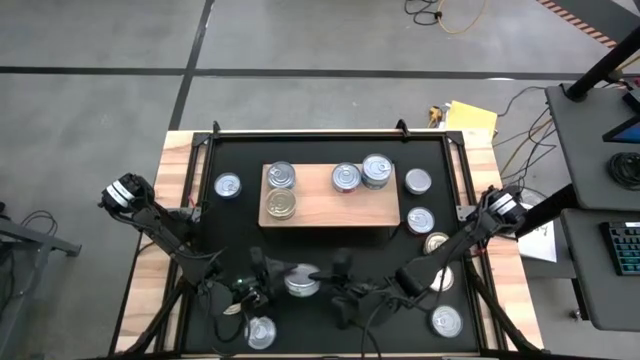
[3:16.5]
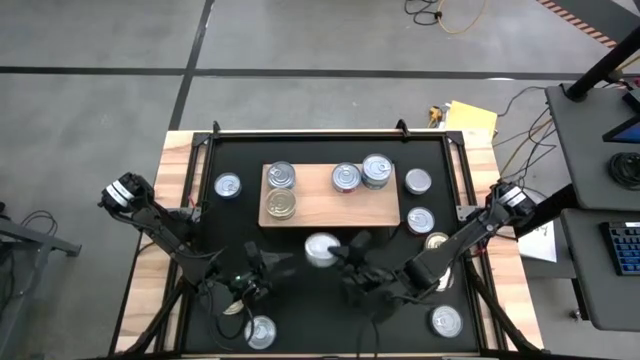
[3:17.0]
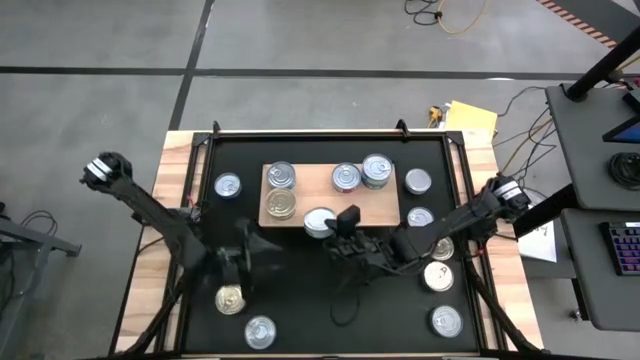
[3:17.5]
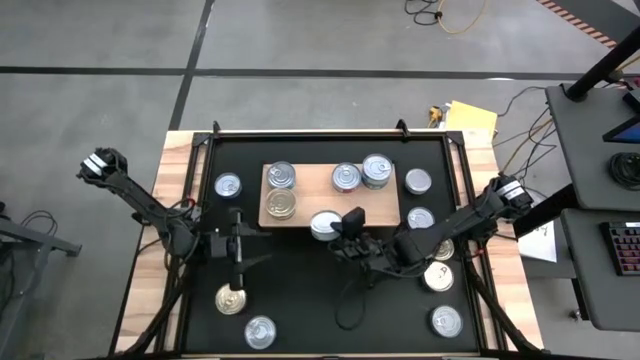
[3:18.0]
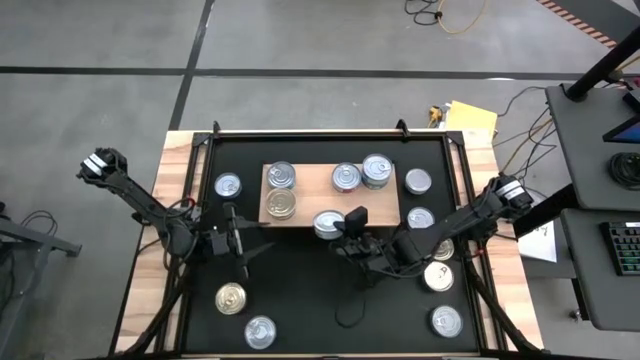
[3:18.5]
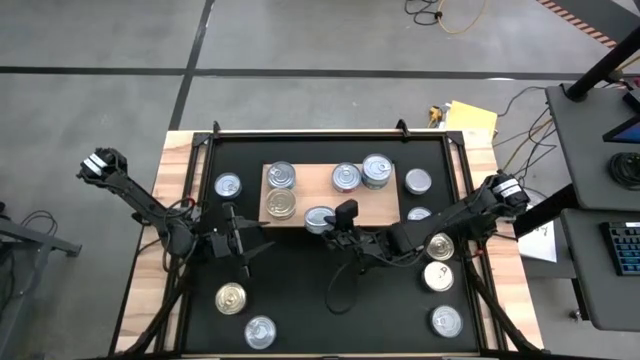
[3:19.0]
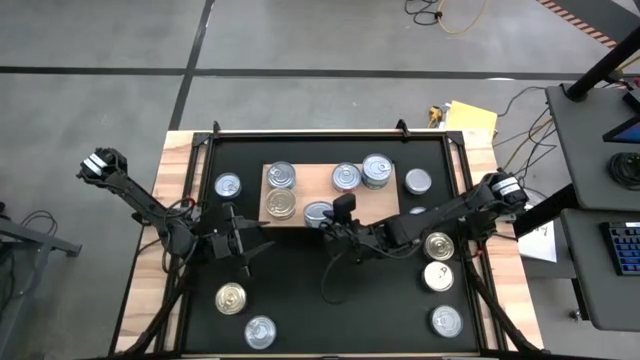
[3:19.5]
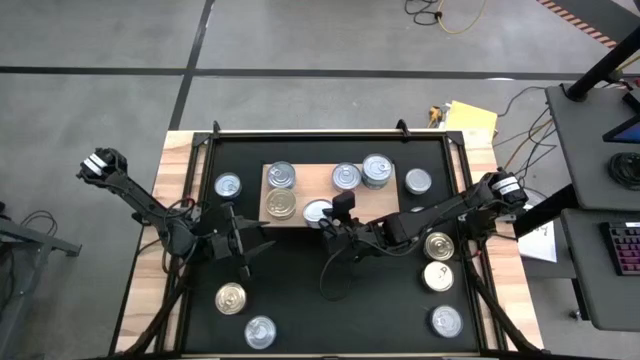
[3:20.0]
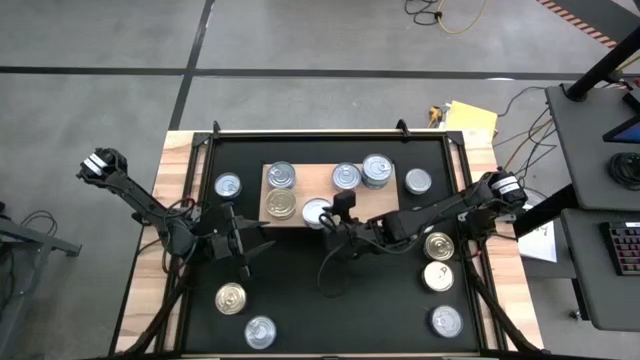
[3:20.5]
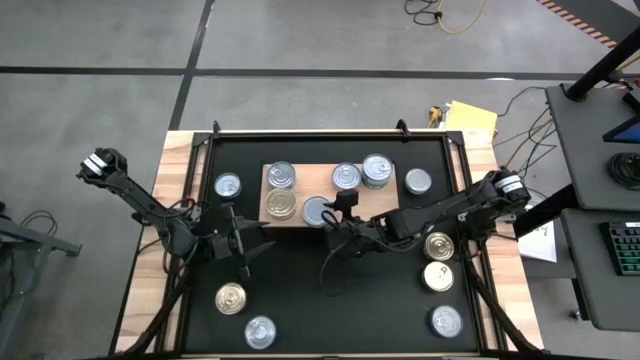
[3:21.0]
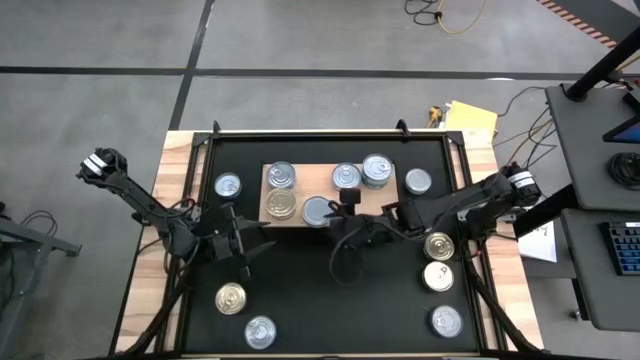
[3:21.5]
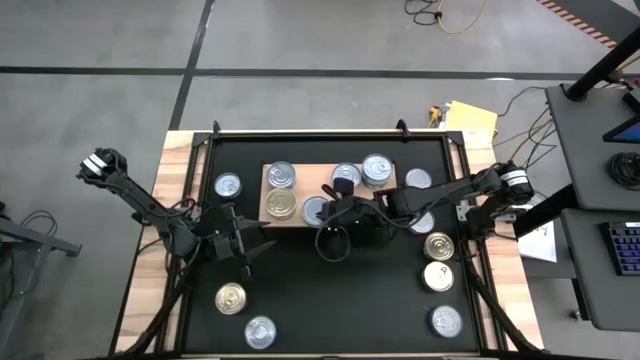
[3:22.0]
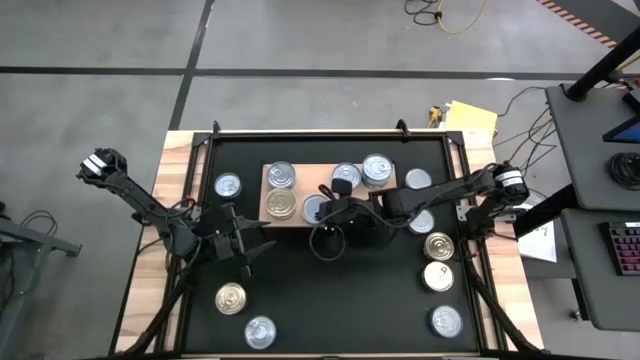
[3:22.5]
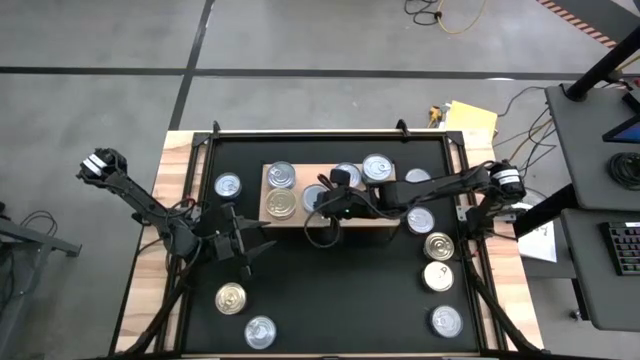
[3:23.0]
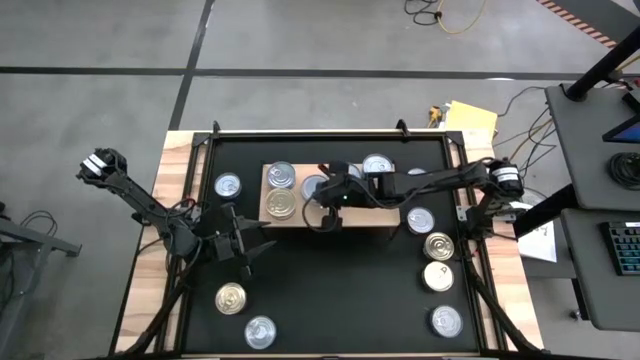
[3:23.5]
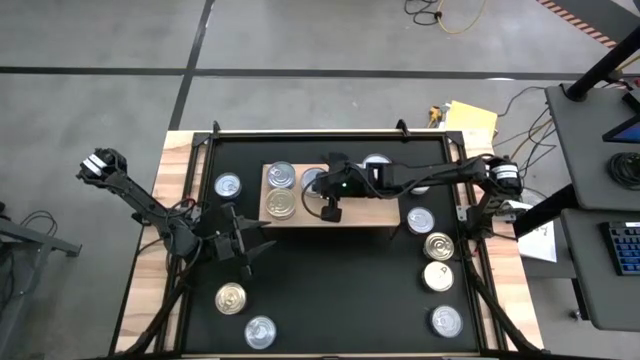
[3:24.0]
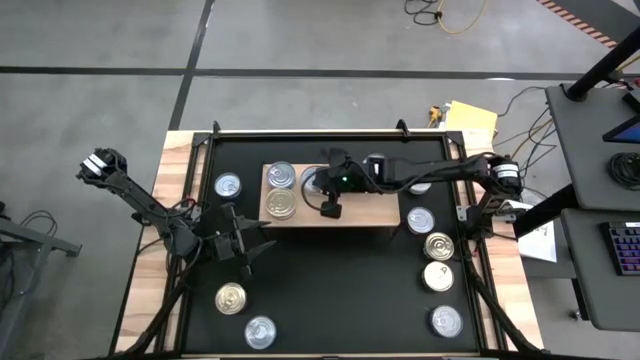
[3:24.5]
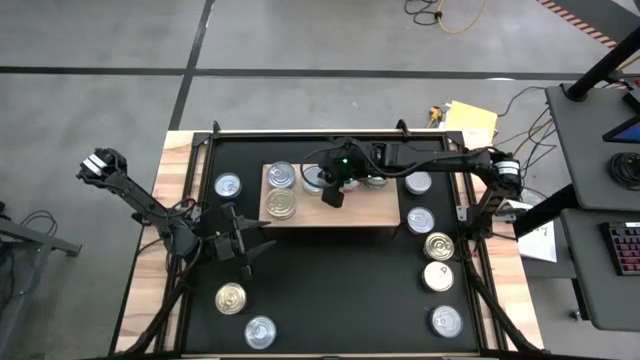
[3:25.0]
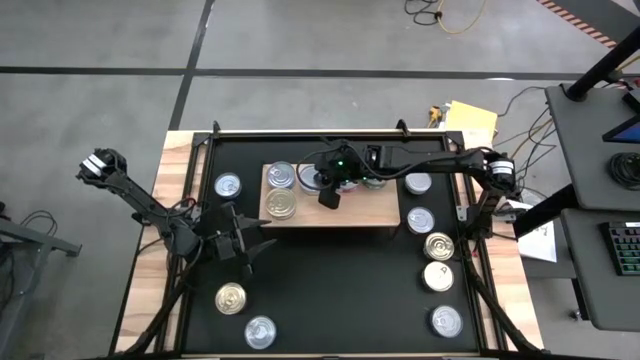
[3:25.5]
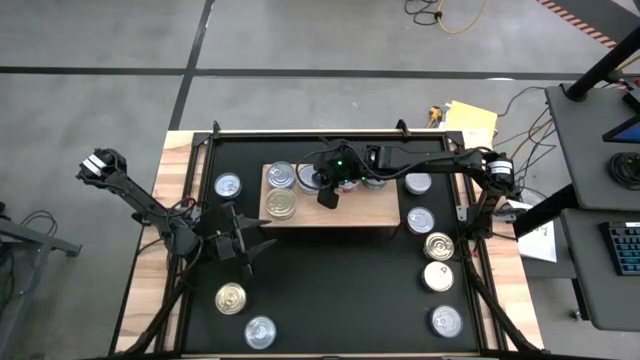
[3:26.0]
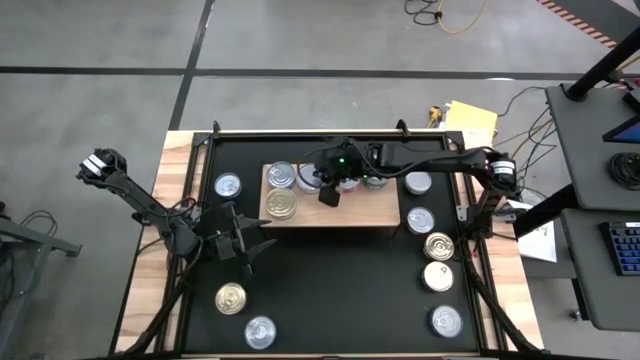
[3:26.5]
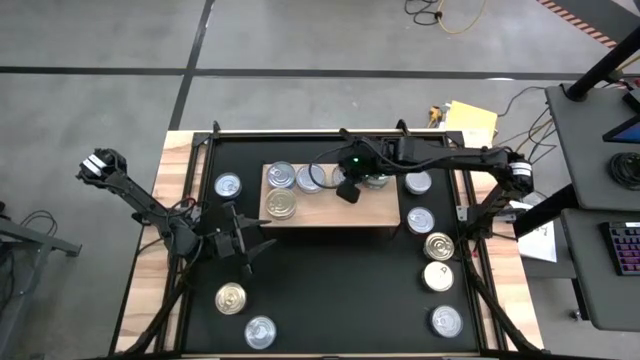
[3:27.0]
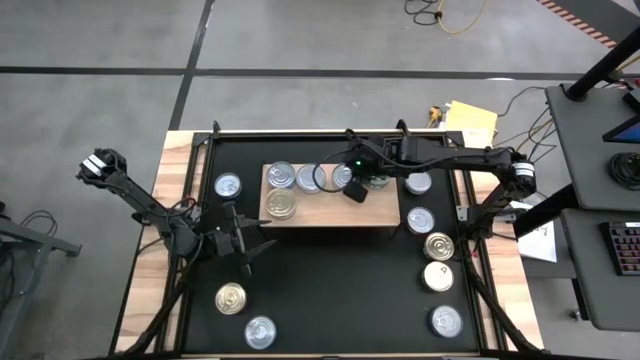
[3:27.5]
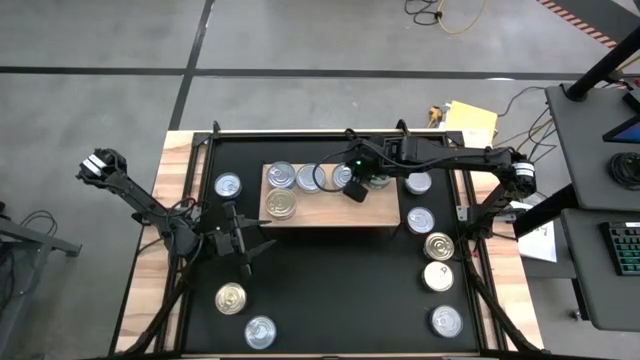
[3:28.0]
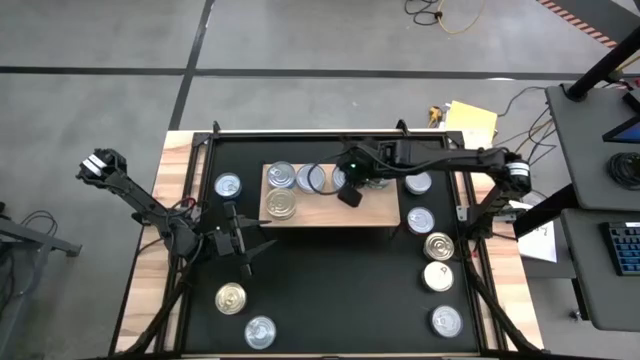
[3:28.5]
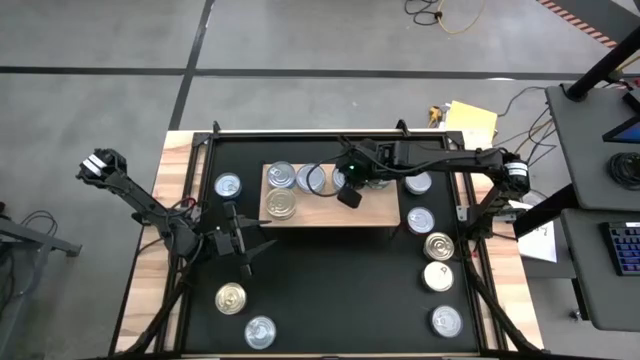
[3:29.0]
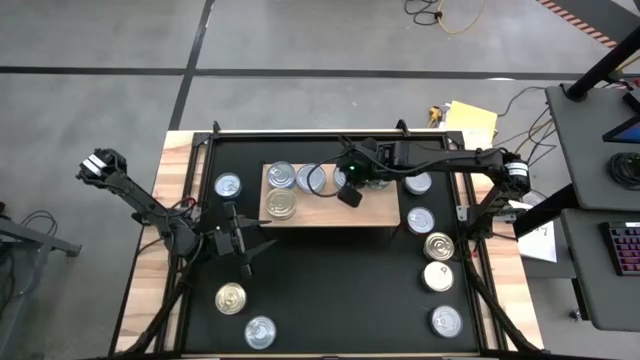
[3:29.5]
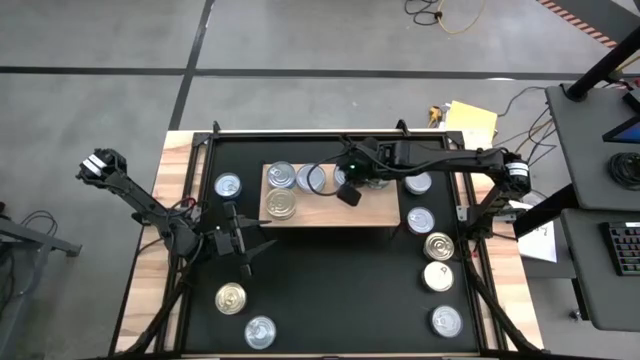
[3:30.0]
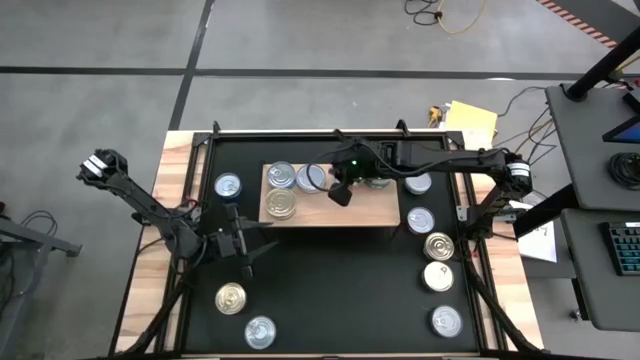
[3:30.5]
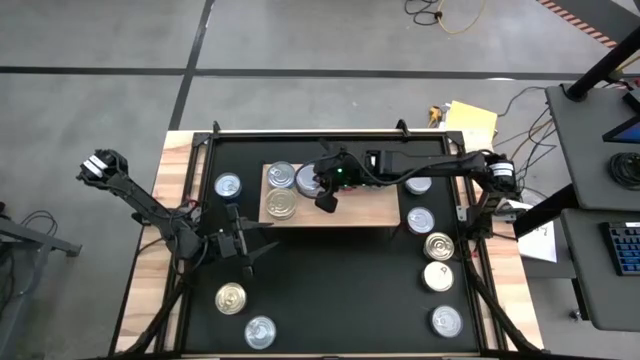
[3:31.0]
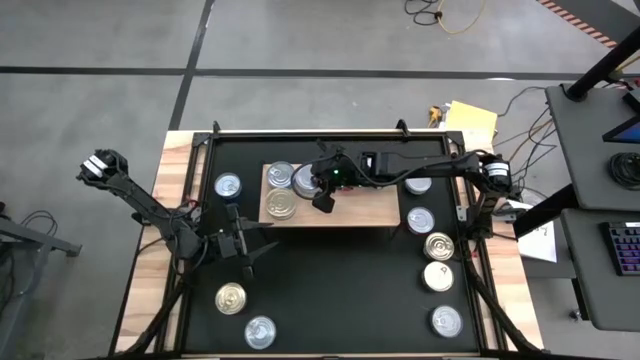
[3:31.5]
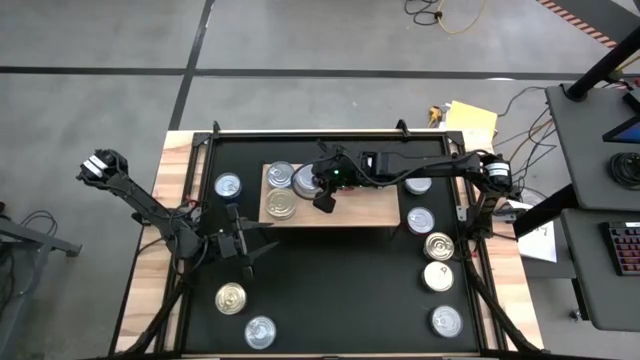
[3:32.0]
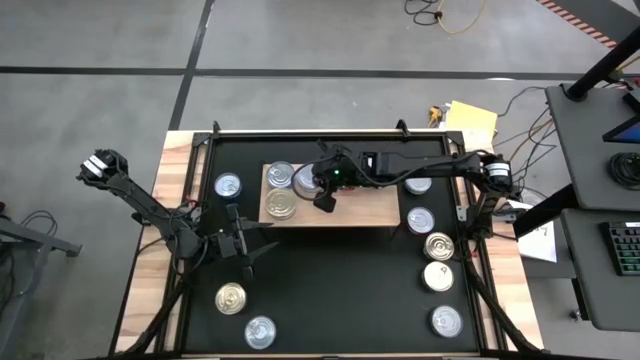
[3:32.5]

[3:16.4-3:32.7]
Task: Stack canned seafood by type on shelf
Put the green tuna can on the shelf

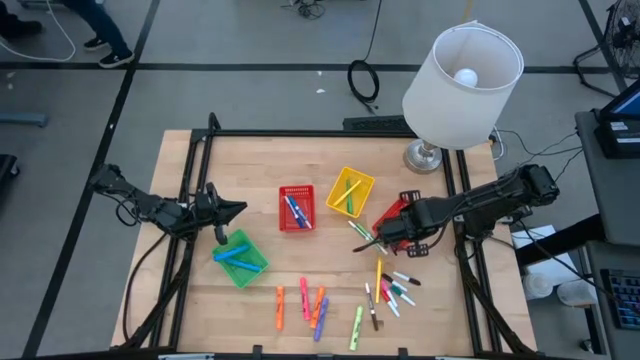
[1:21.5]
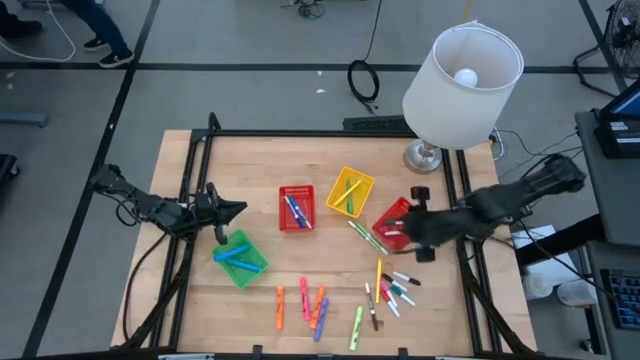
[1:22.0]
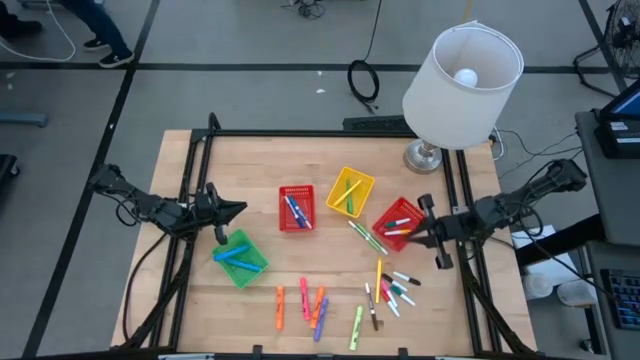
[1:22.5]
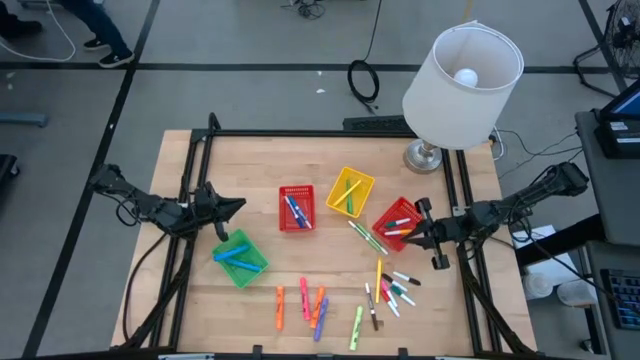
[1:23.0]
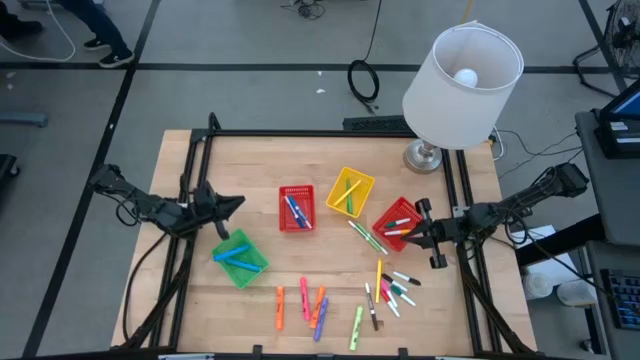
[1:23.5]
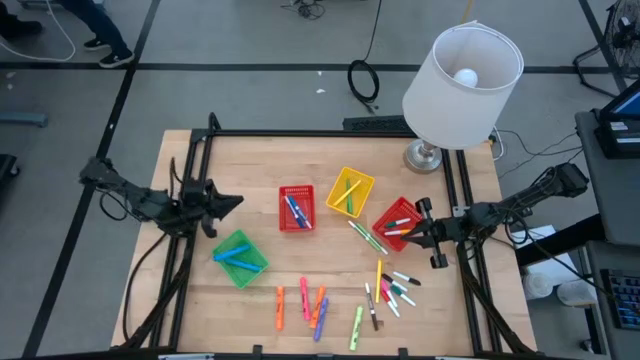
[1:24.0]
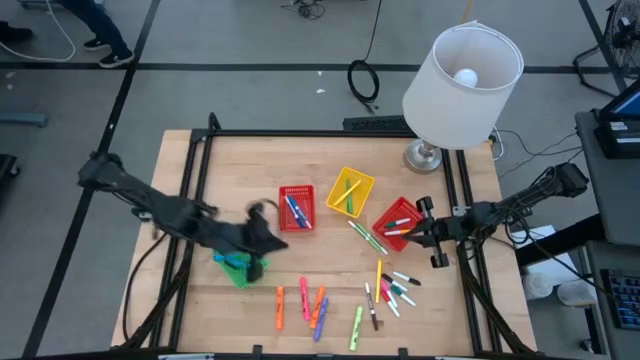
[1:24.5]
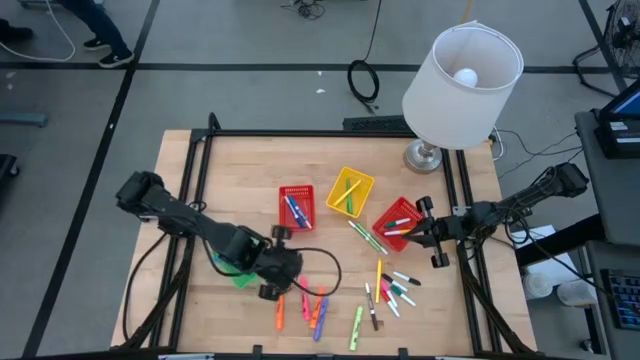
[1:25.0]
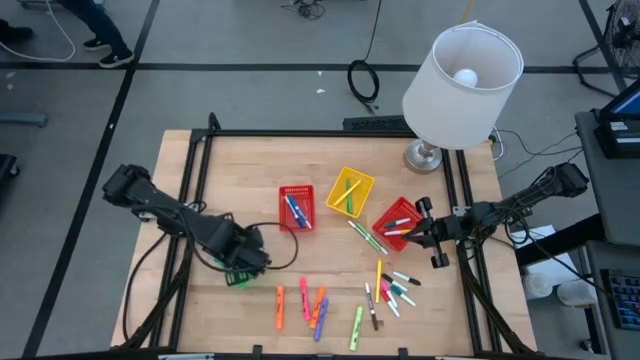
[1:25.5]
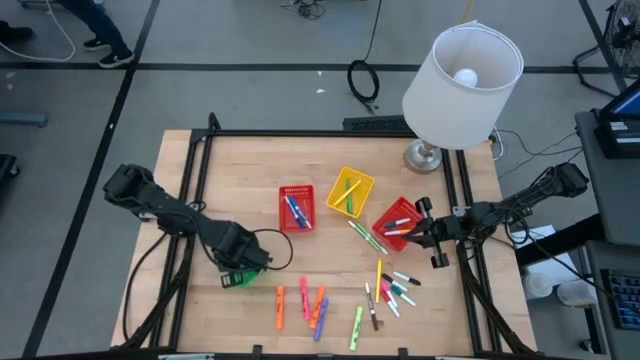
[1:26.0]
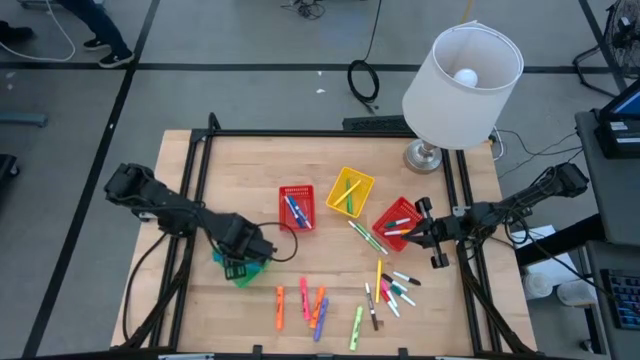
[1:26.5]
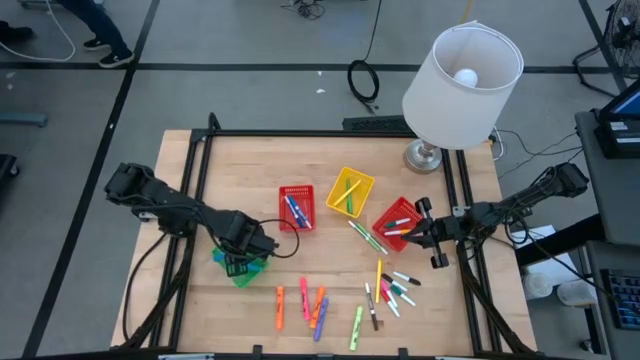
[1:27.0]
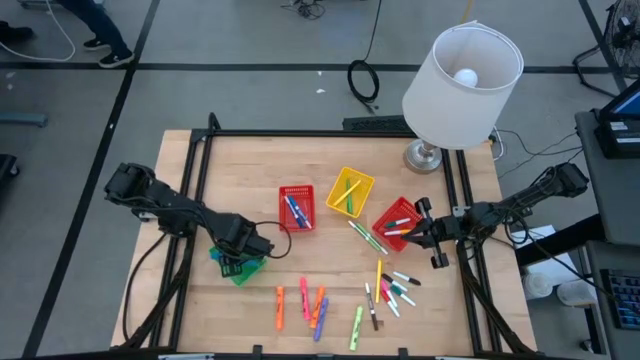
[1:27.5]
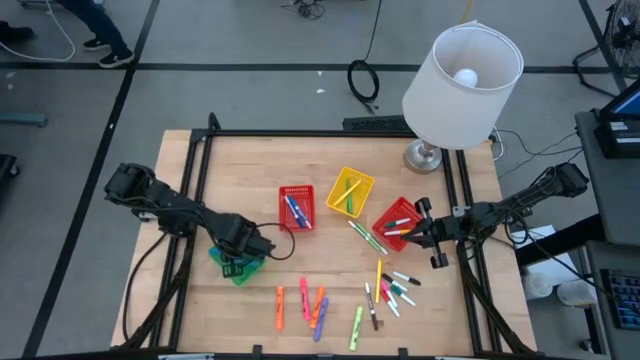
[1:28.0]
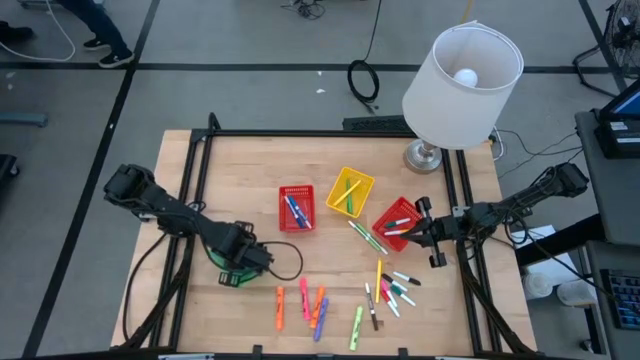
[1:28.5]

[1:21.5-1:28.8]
Task: Pick & Place Markers
Adjust the large blue highlighter pen in the green bin
